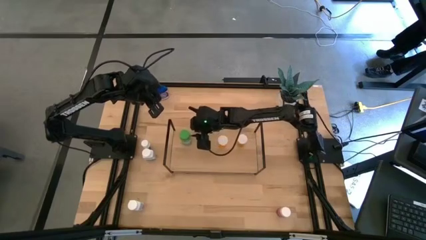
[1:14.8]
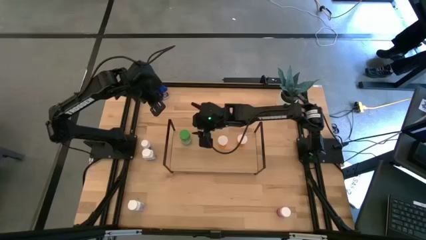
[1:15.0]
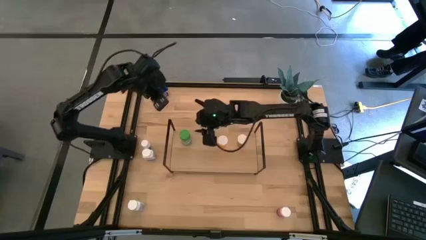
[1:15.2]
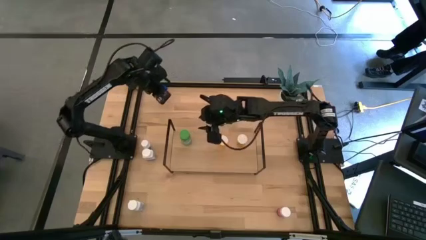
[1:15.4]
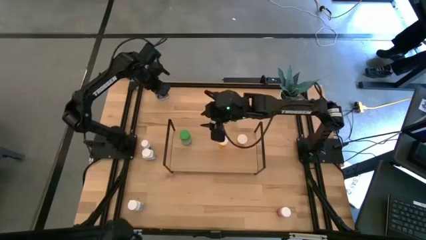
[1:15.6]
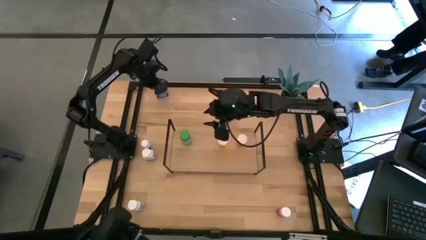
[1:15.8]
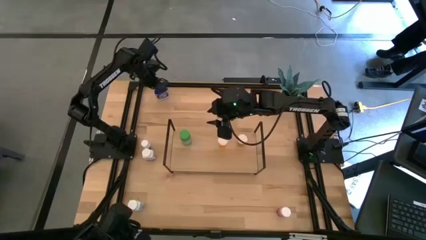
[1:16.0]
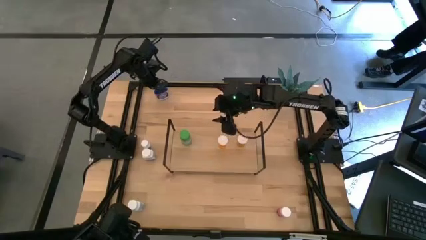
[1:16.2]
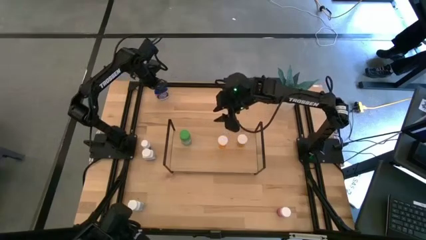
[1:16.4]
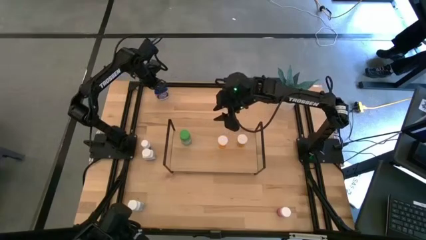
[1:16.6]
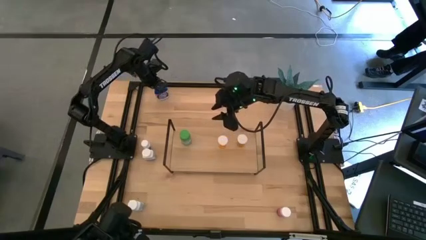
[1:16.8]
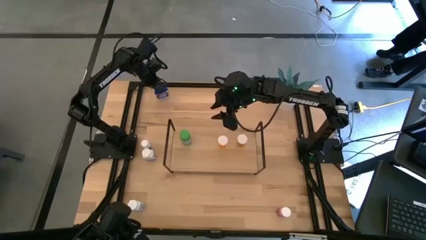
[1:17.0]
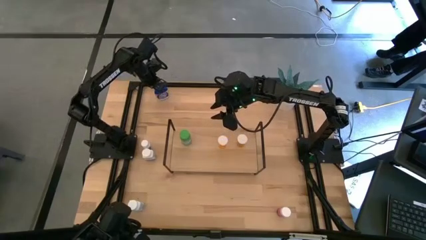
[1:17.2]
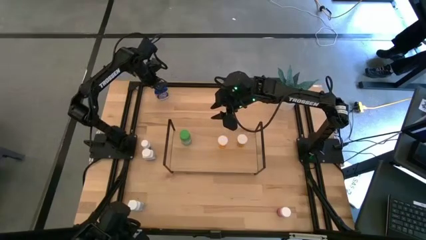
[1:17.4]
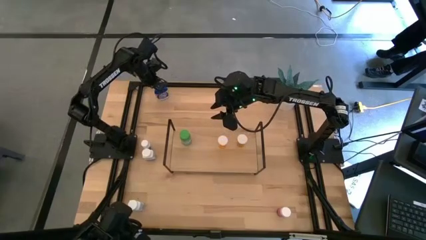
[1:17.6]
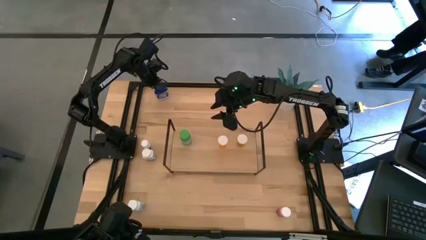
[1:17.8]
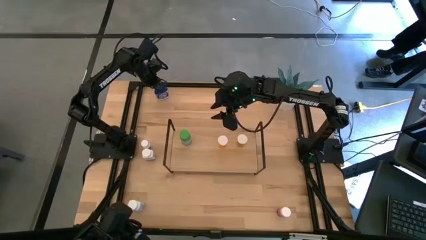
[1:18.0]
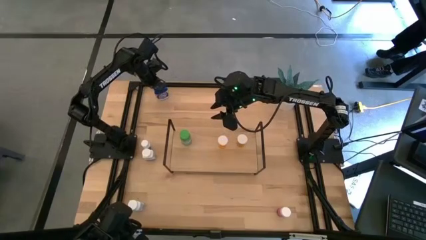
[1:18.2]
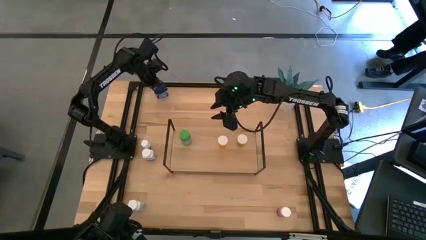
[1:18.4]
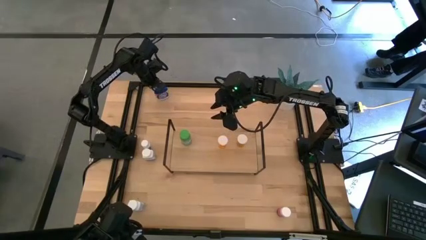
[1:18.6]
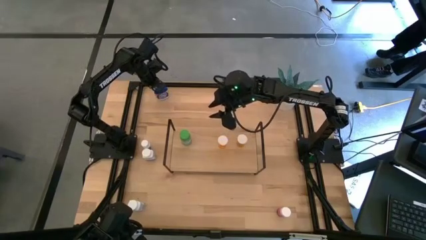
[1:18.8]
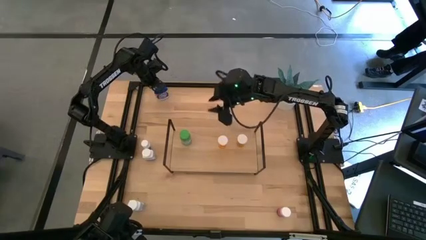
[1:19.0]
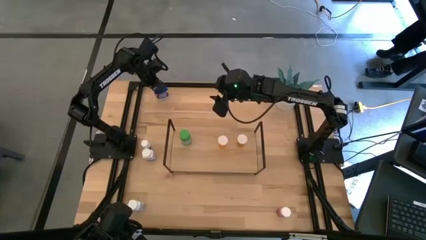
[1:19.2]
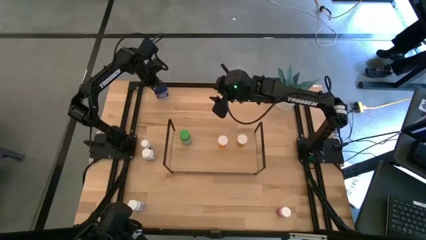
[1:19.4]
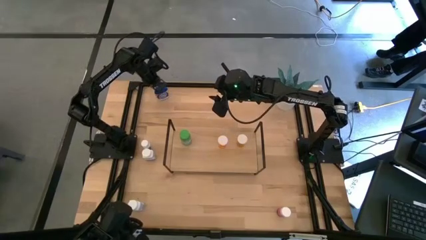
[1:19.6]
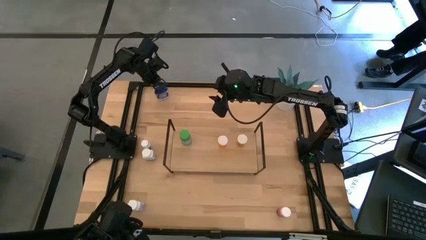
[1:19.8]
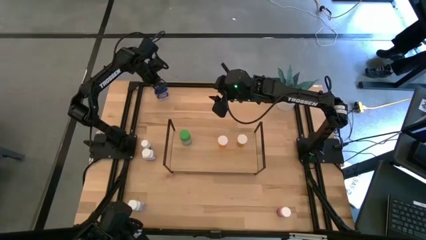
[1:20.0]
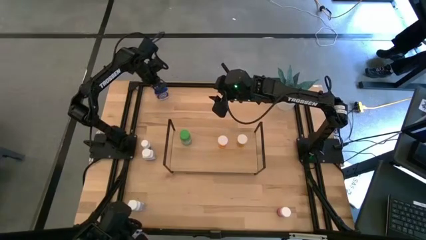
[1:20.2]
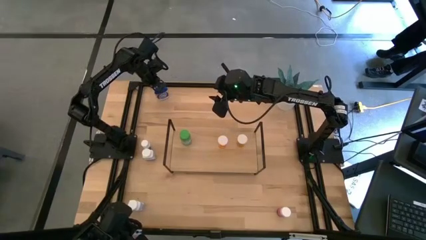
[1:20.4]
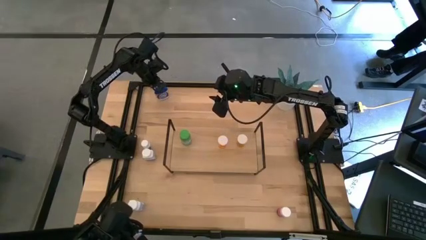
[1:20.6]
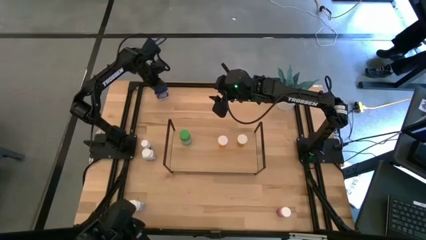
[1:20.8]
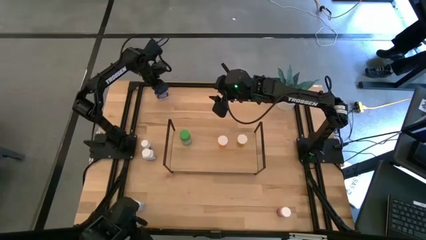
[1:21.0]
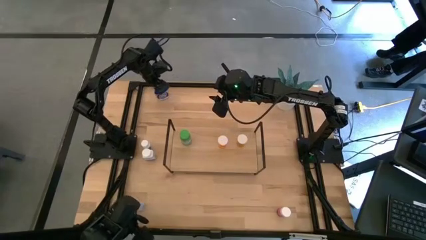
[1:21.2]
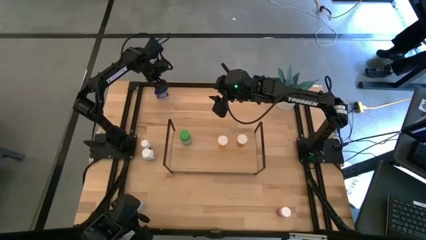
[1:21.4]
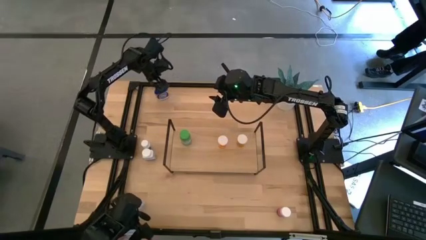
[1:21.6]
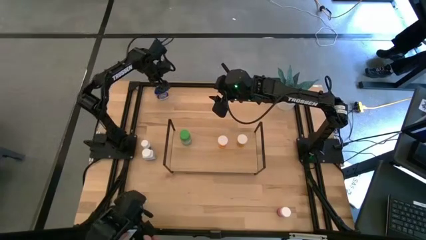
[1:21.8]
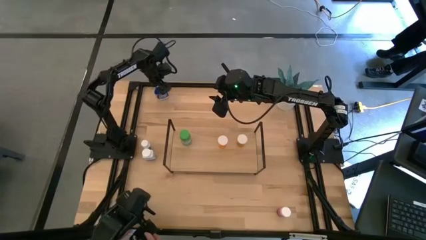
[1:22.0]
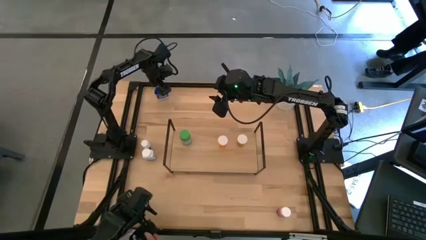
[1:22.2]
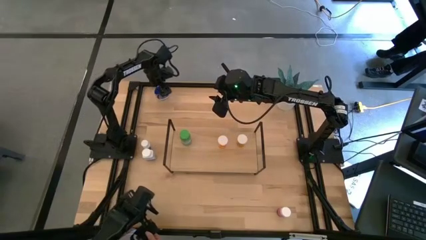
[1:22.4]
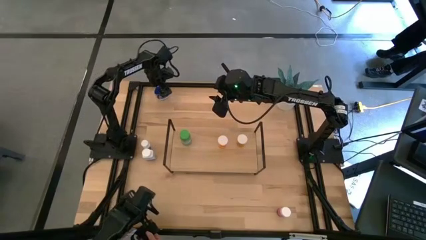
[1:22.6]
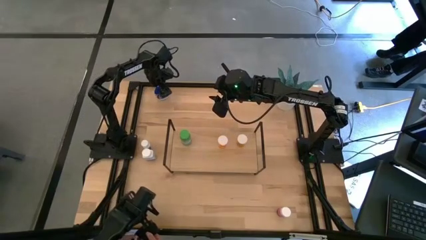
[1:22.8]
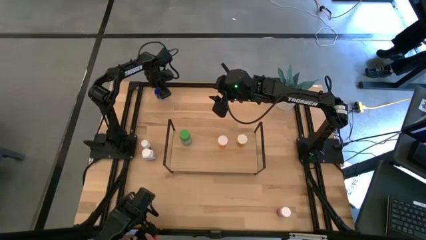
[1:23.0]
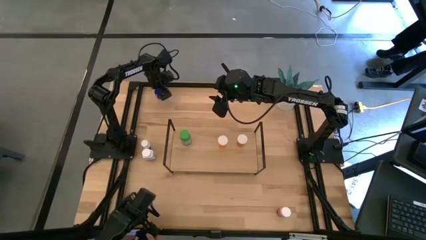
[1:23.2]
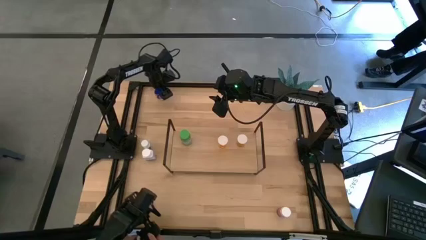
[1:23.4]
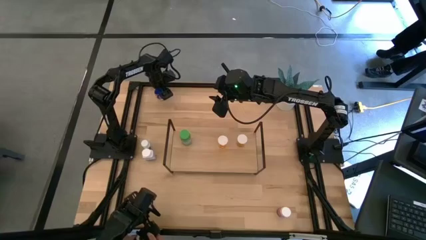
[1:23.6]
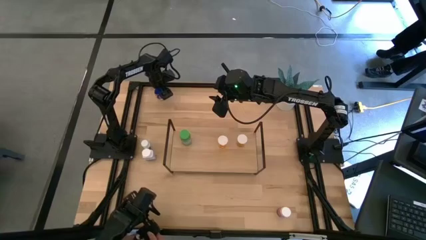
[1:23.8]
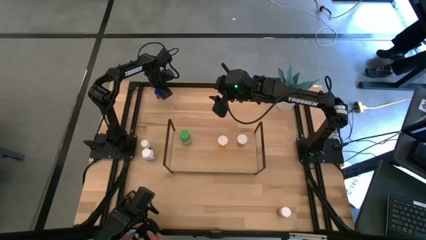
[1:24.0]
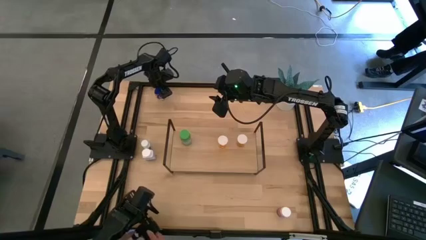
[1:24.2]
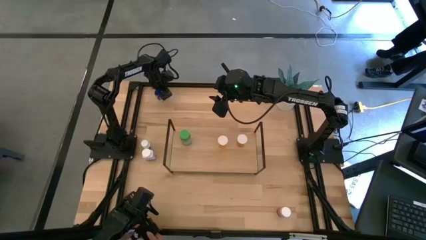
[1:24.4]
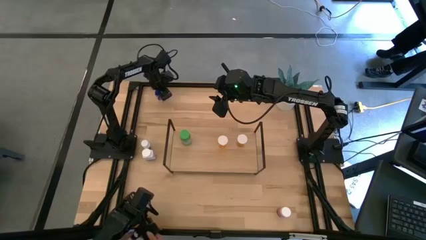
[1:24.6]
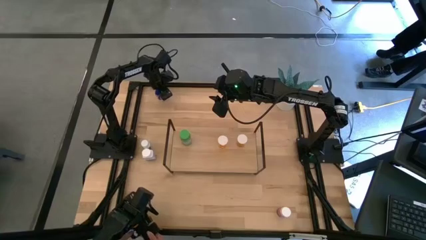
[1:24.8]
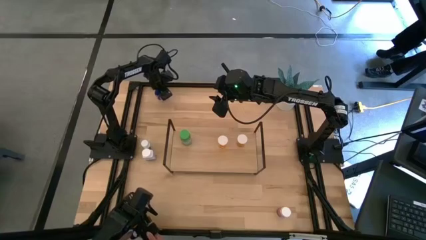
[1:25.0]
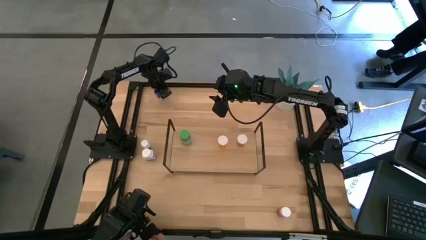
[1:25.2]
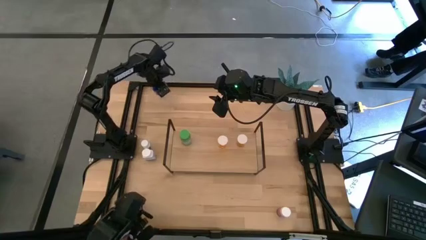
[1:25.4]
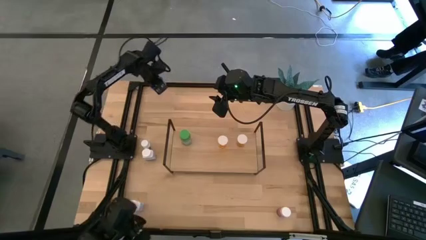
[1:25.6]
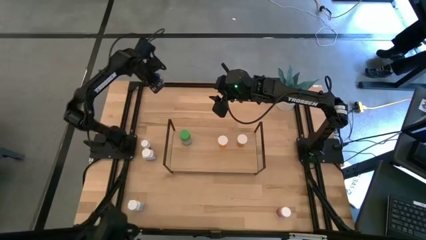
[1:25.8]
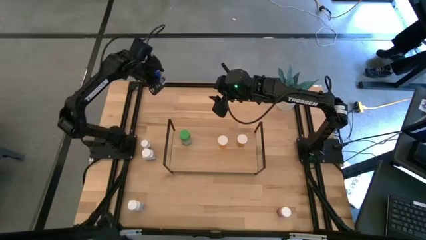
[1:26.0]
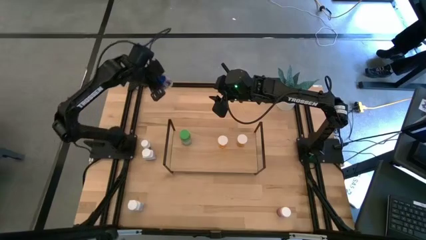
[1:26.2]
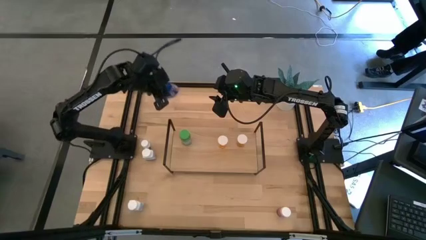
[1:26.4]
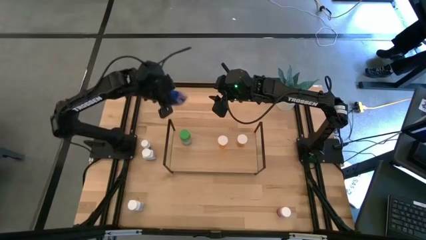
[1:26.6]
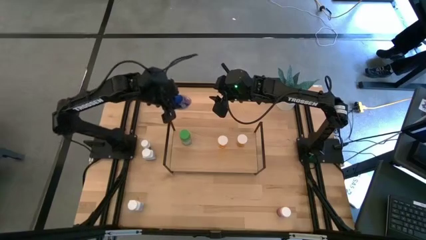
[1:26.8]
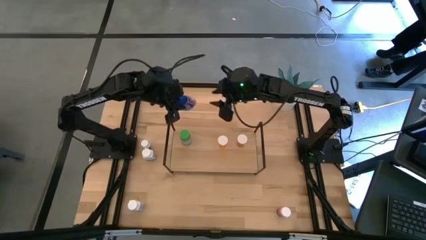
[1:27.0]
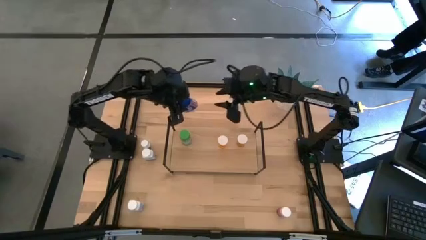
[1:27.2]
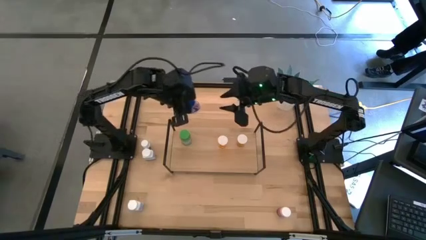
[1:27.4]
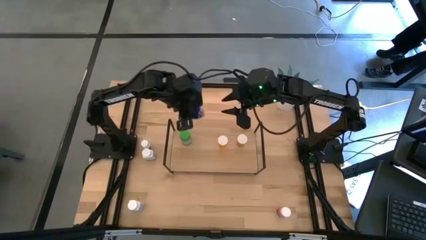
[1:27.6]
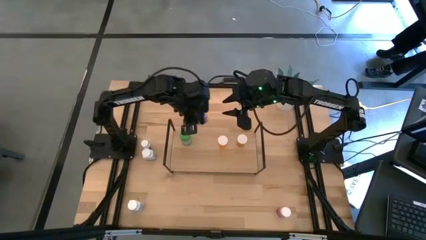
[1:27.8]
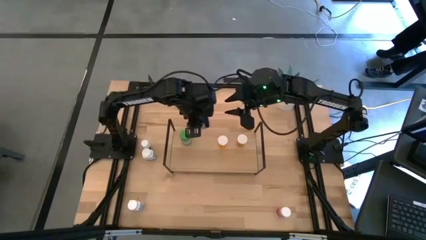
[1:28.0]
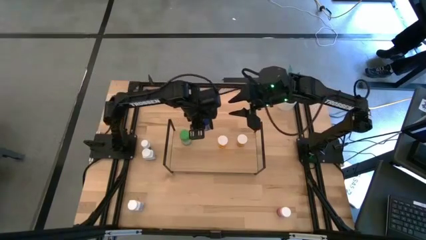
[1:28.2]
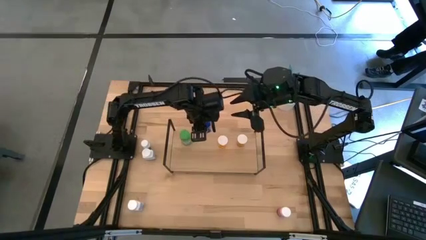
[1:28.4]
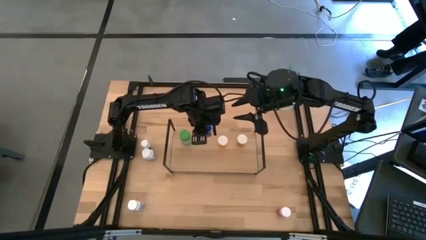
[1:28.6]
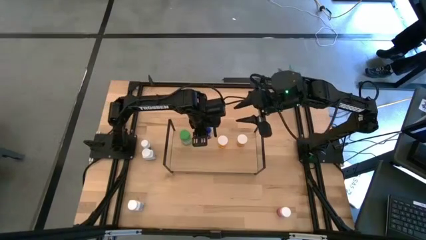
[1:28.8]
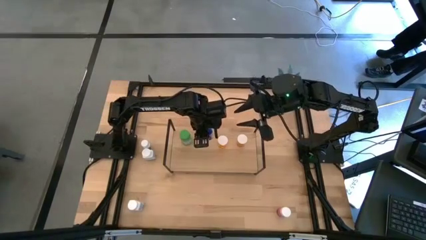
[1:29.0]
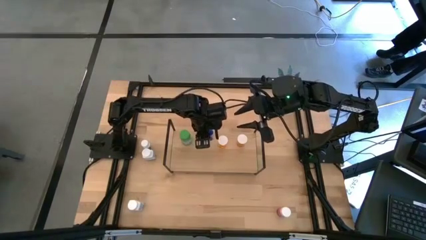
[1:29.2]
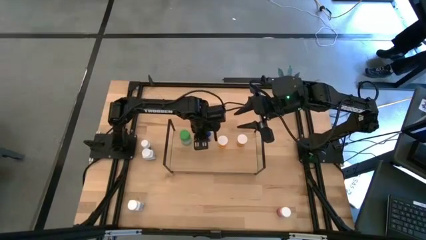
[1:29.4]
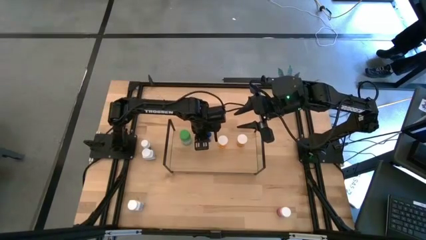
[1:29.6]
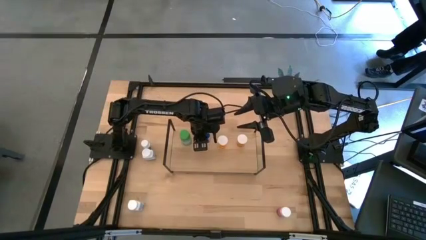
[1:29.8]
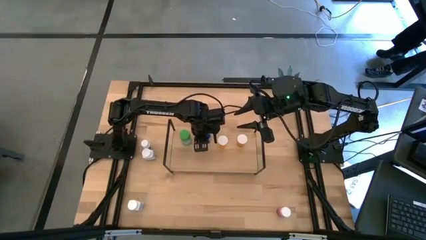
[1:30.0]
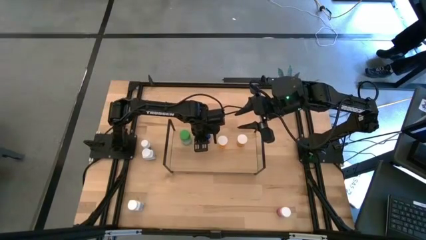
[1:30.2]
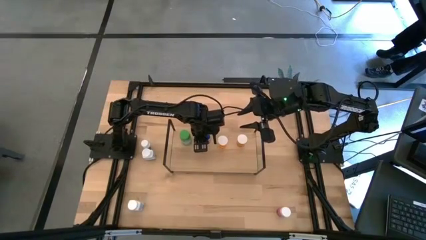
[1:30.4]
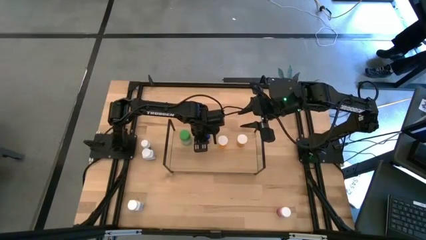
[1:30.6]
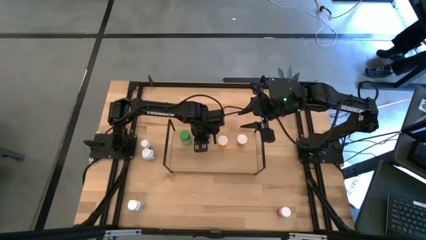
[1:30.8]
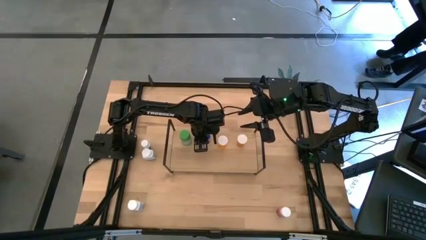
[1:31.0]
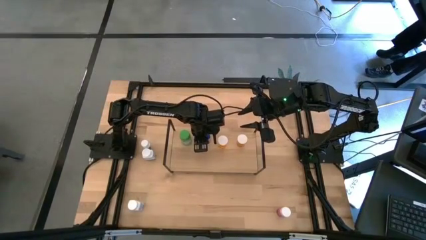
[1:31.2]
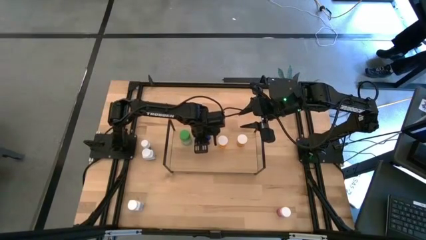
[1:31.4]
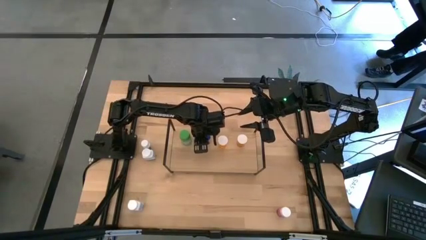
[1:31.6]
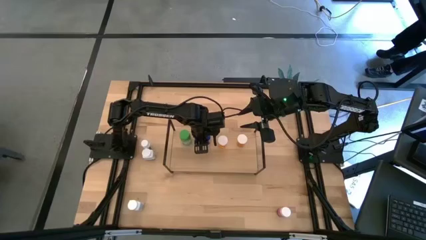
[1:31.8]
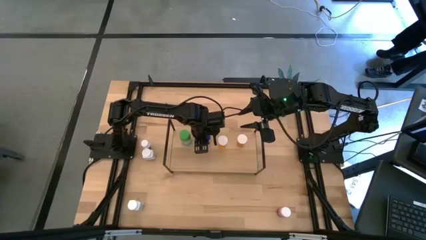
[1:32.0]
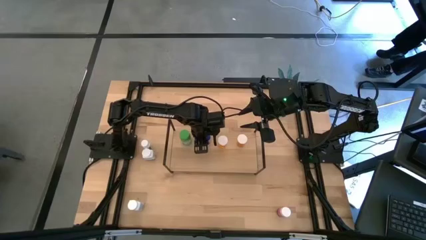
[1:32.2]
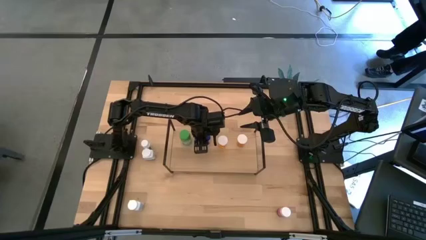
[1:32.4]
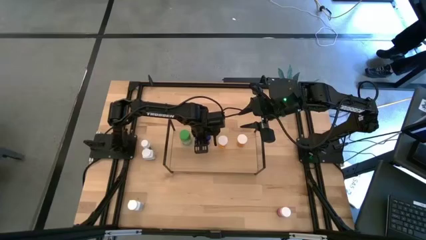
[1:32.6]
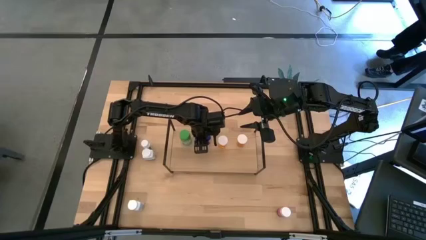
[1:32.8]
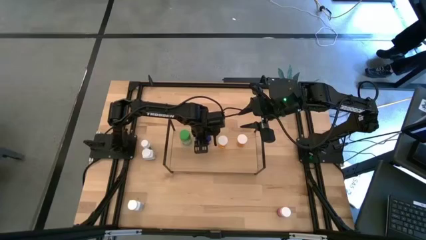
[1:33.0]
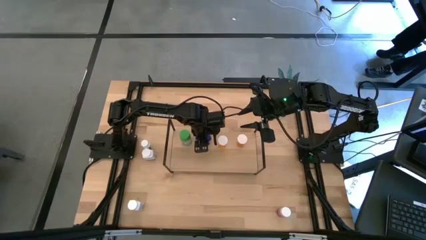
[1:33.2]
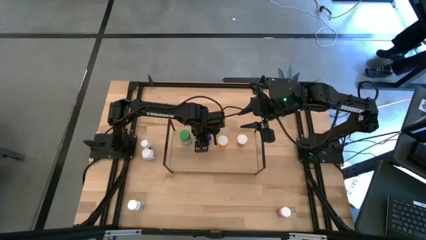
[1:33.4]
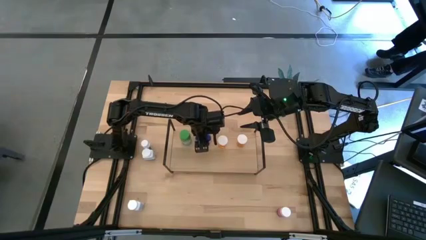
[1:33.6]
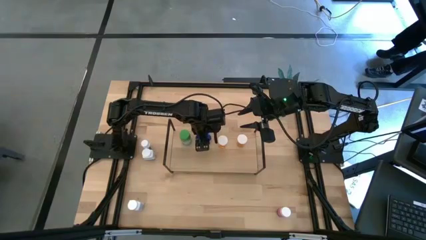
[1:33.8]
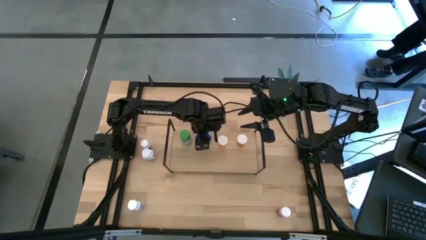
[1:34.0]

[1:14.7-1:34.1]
Task: Pick and place medicine bottles onto shelf by color
Put the blue pill bottle on the shelf
